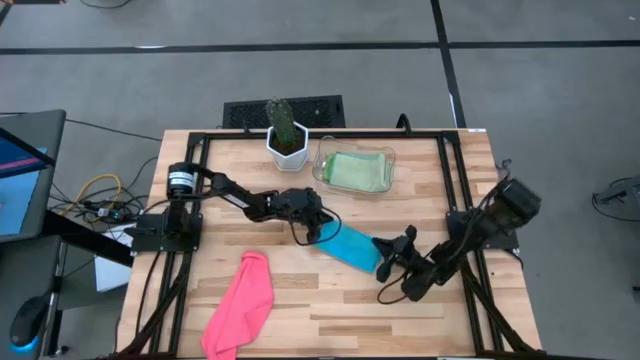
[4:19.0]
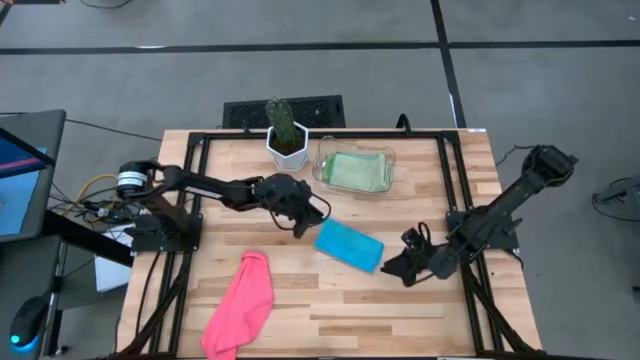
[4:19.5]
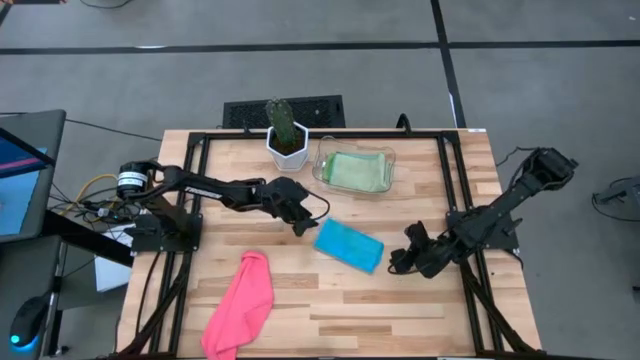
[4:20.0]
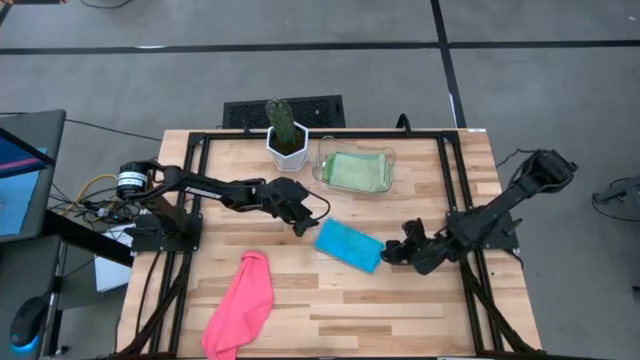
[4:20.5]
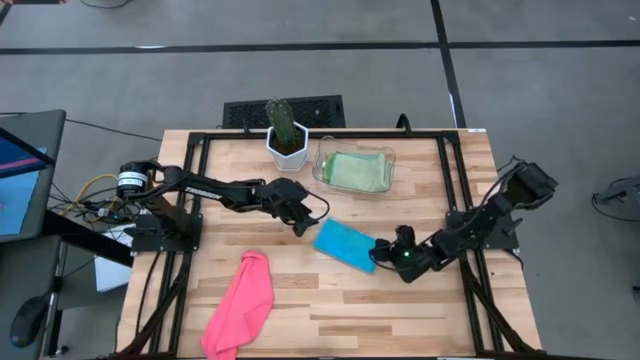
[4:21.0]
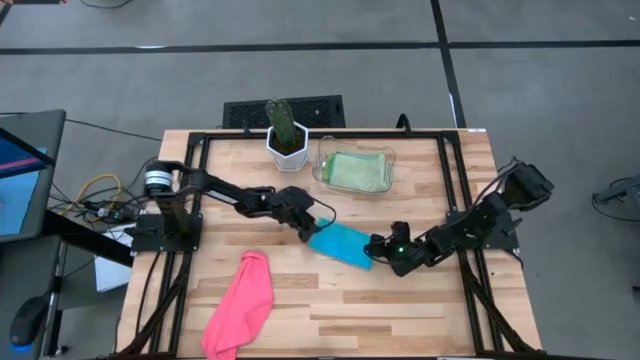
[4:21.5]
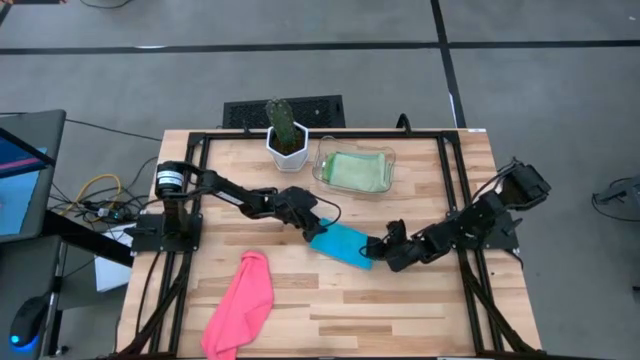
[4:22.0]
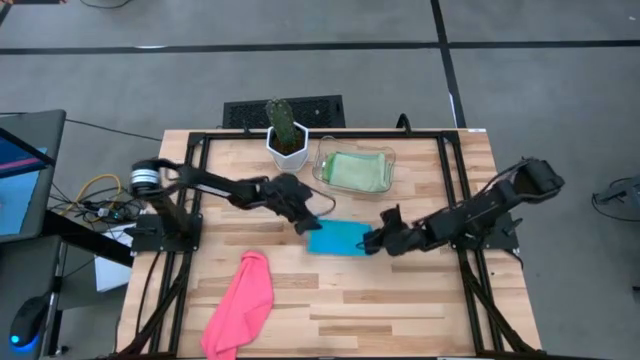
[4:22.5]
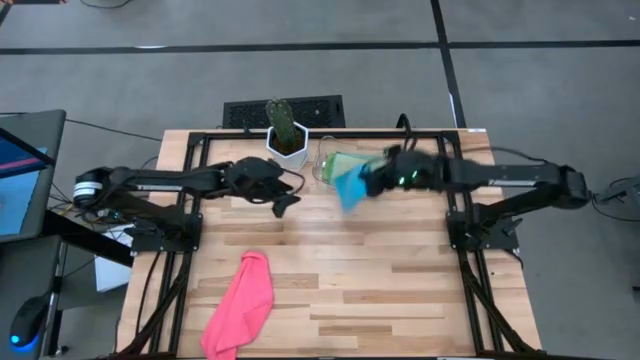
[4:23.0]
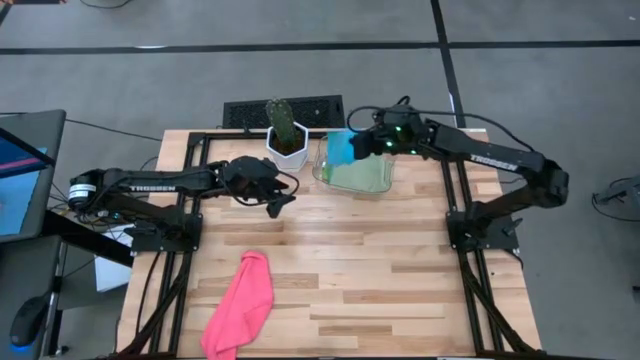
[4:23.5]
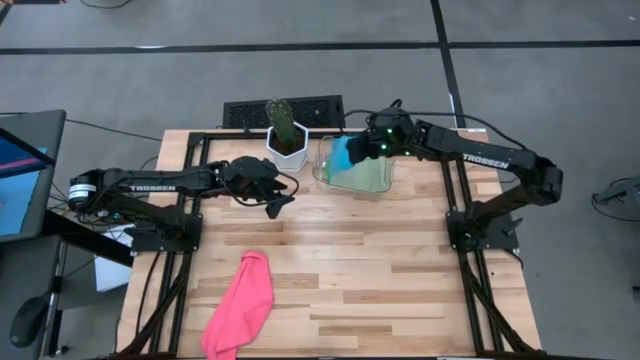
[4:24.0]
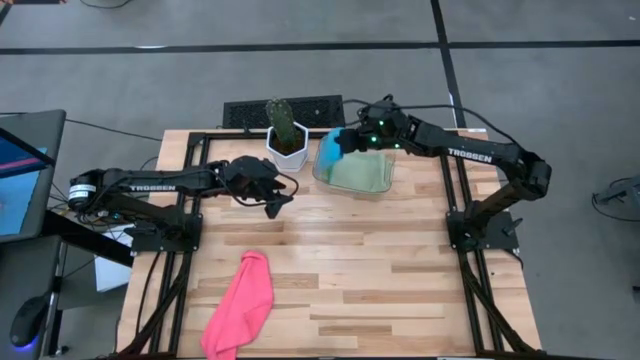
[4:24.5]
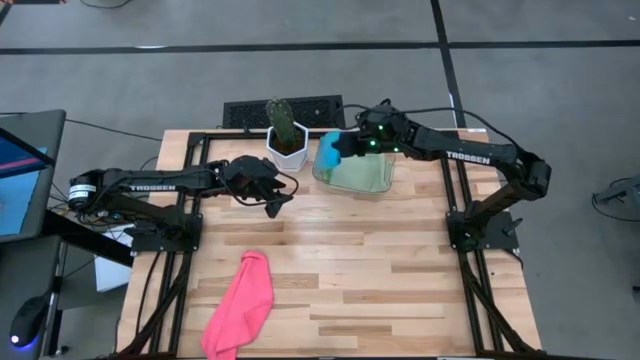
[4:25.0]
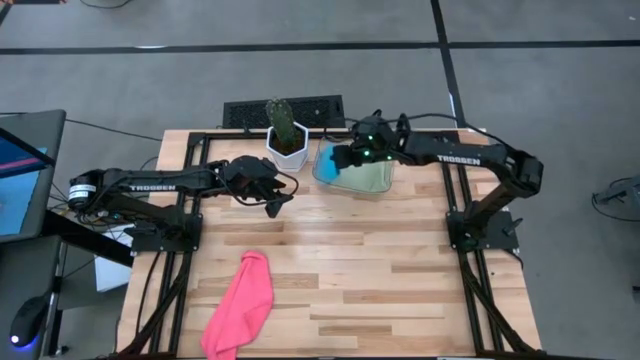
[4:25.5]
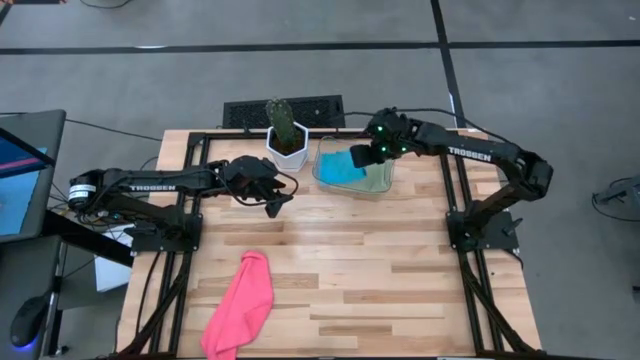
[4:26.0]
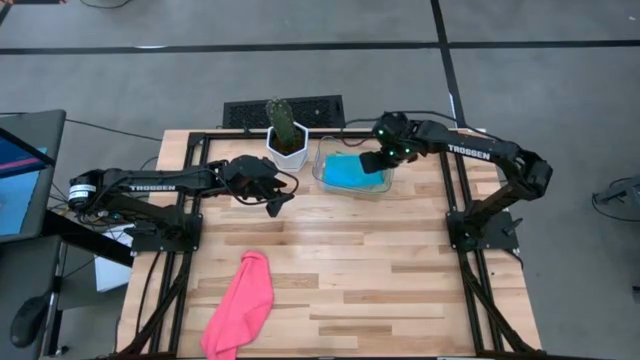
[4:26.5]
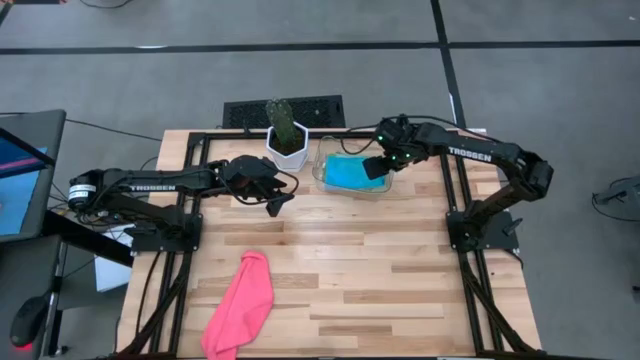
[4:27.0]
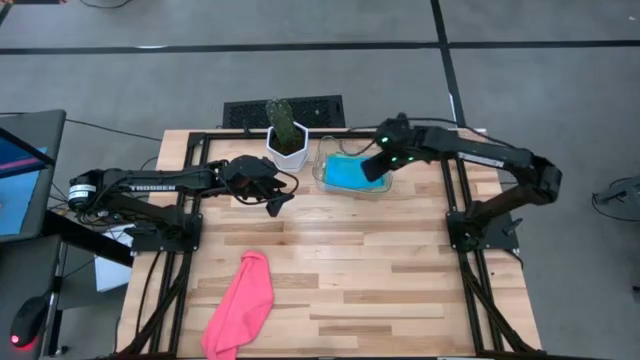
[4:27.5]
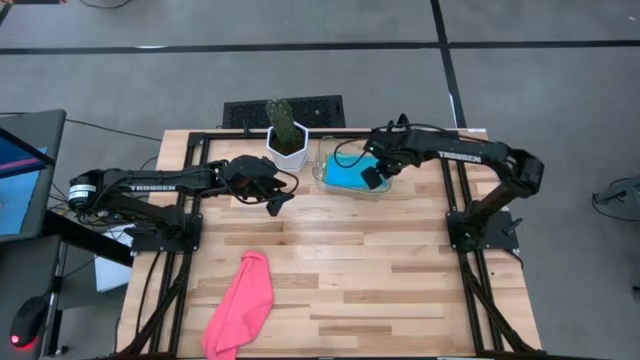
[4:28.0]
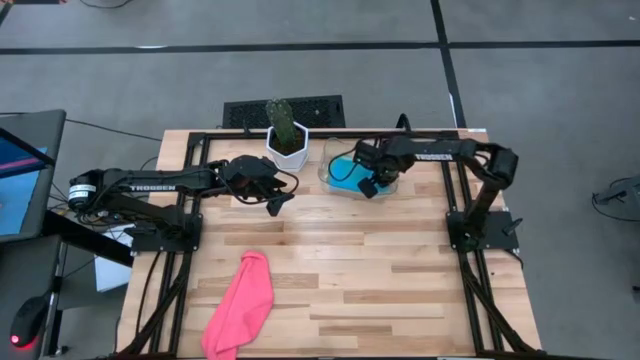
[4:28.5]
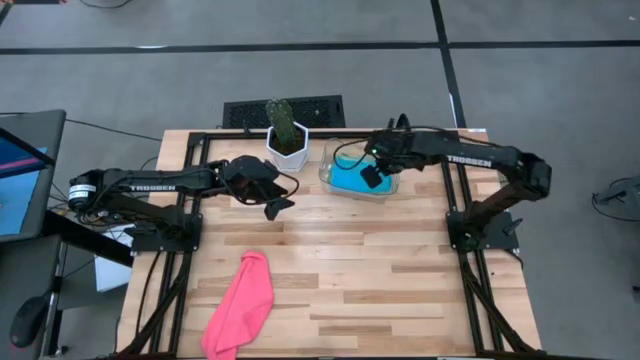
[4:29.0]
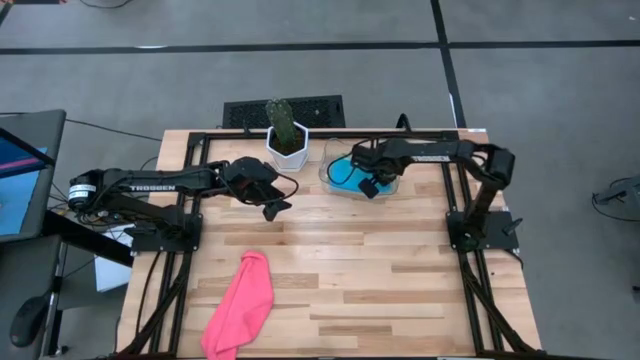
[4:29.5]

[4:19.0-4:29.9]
Task: Fold microfiber towels
Put the folded blue towel into the transparent bin

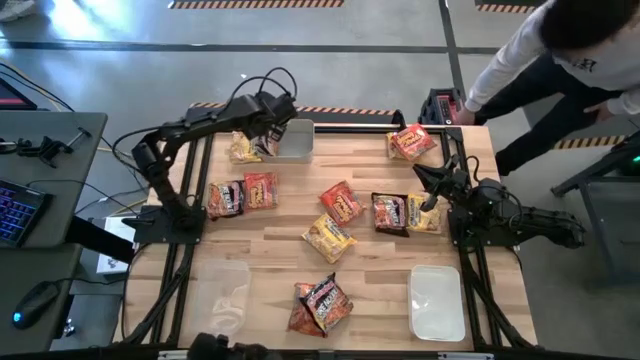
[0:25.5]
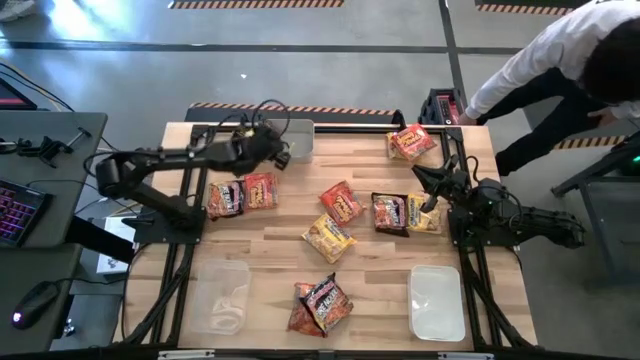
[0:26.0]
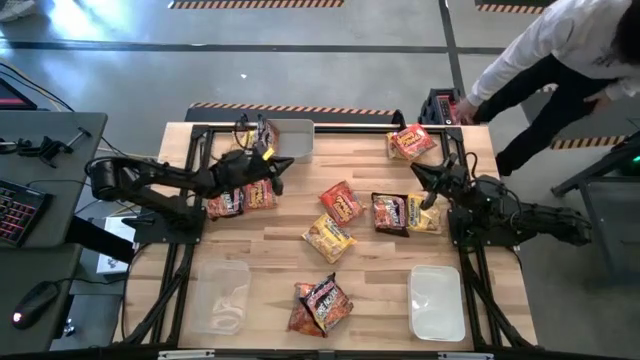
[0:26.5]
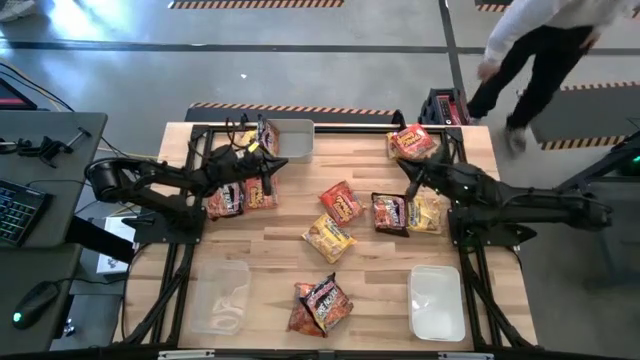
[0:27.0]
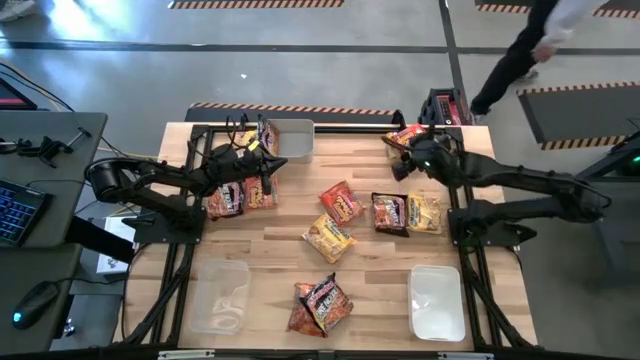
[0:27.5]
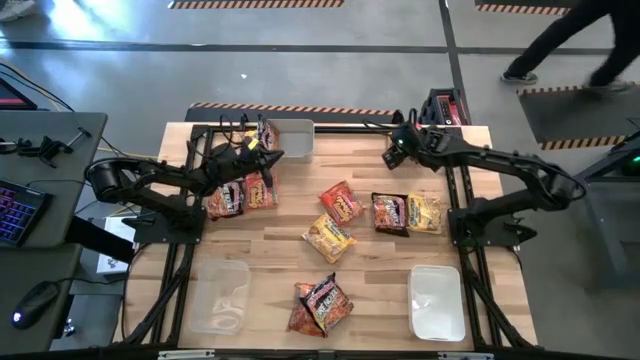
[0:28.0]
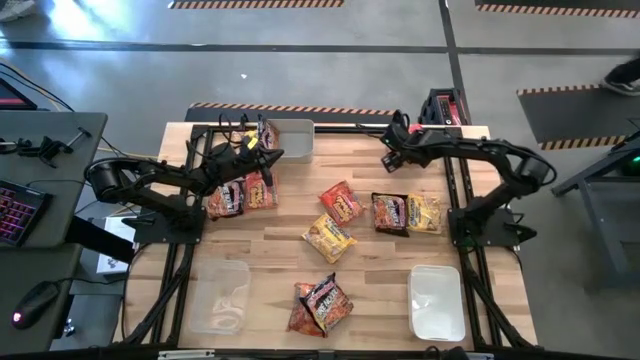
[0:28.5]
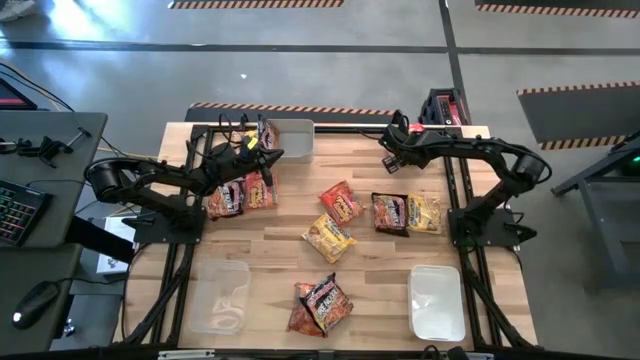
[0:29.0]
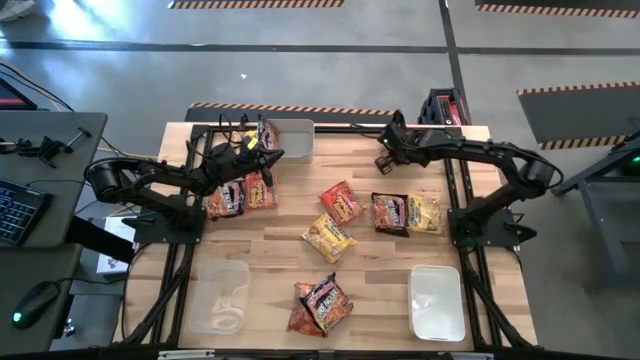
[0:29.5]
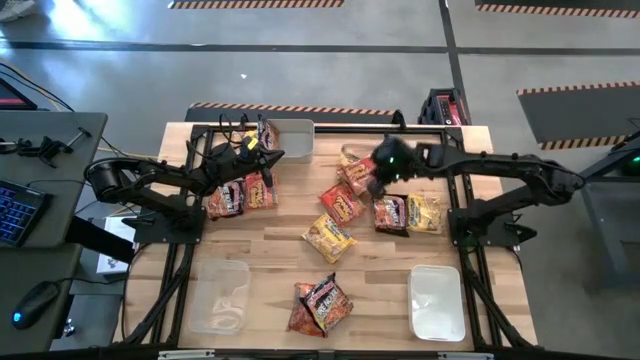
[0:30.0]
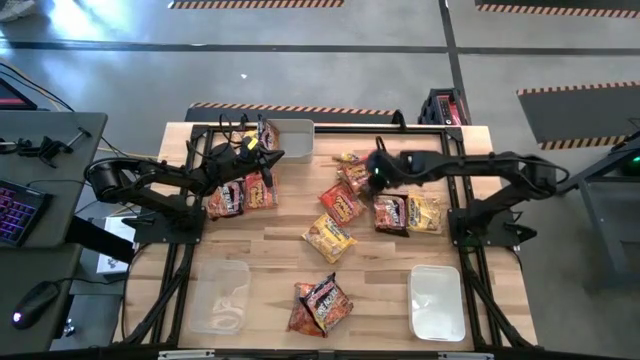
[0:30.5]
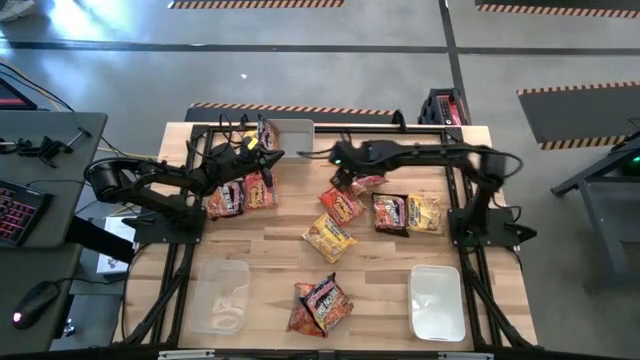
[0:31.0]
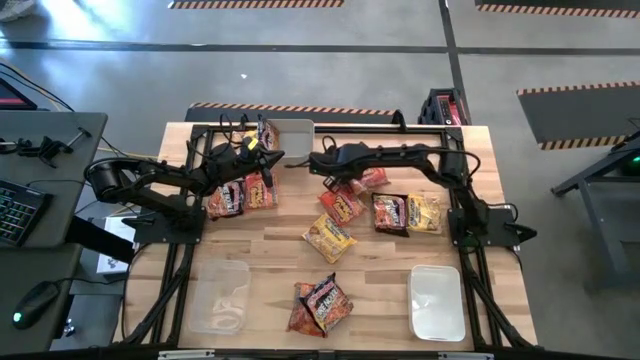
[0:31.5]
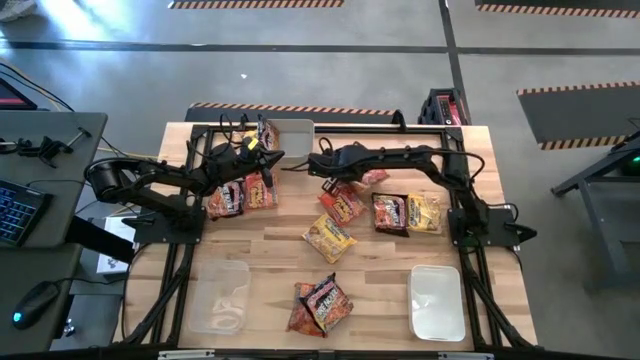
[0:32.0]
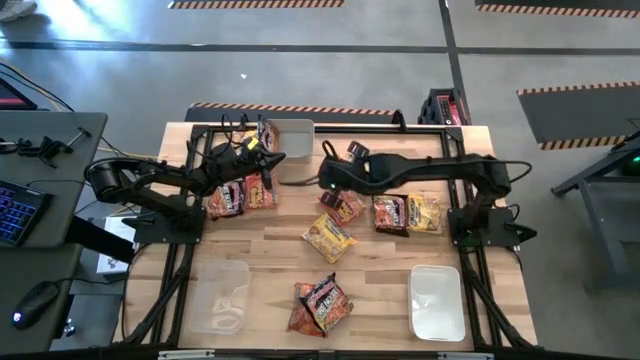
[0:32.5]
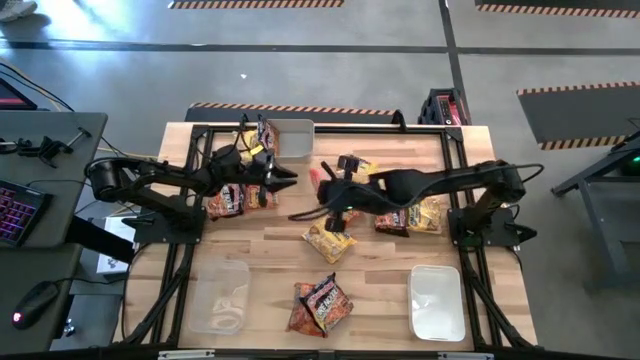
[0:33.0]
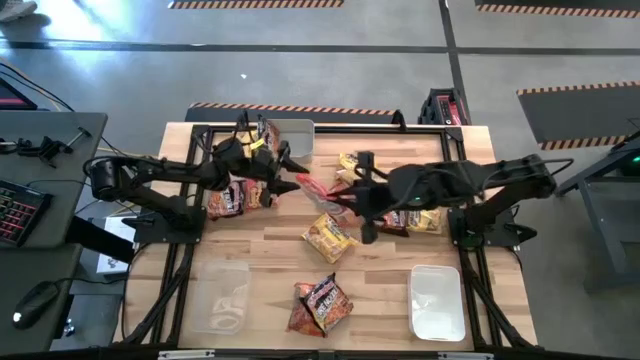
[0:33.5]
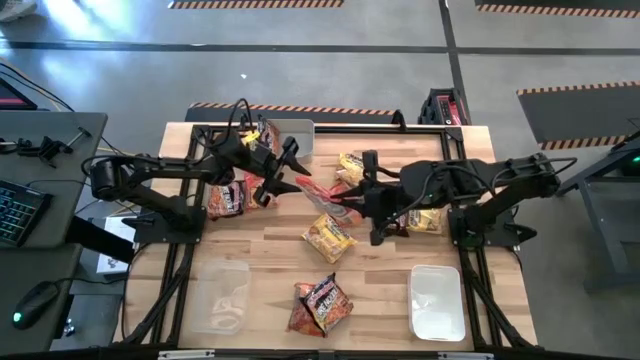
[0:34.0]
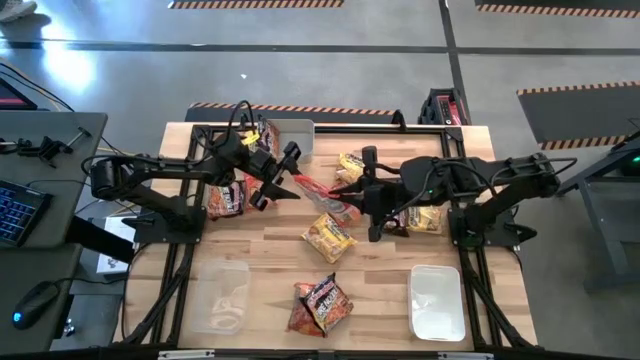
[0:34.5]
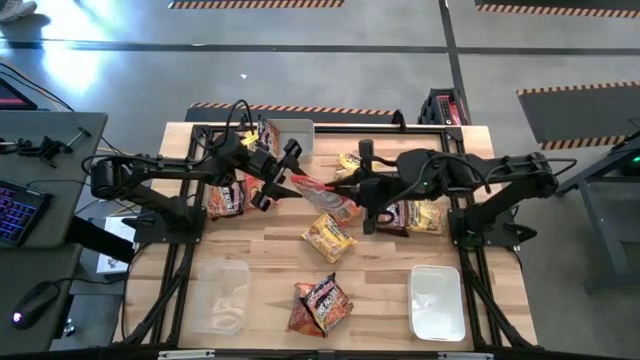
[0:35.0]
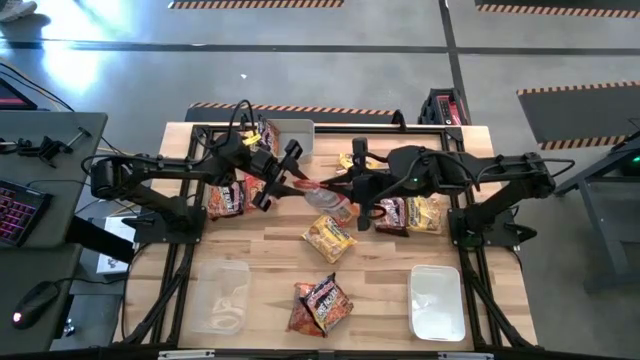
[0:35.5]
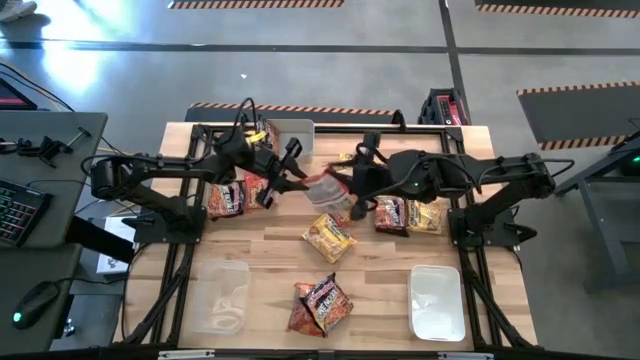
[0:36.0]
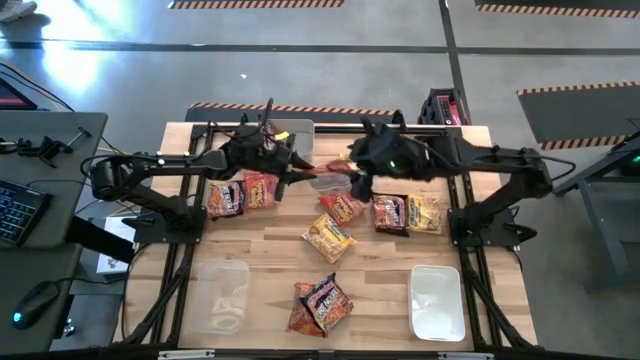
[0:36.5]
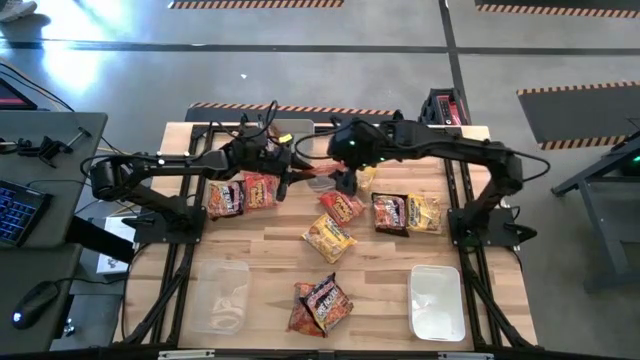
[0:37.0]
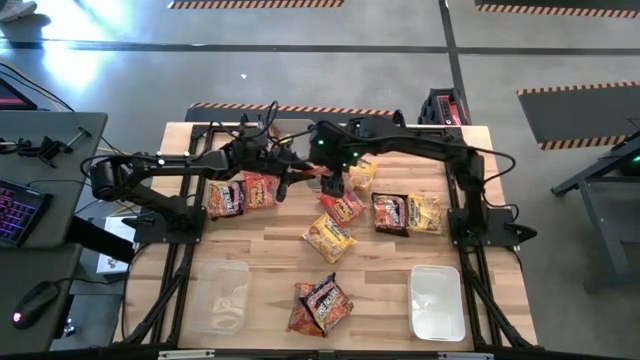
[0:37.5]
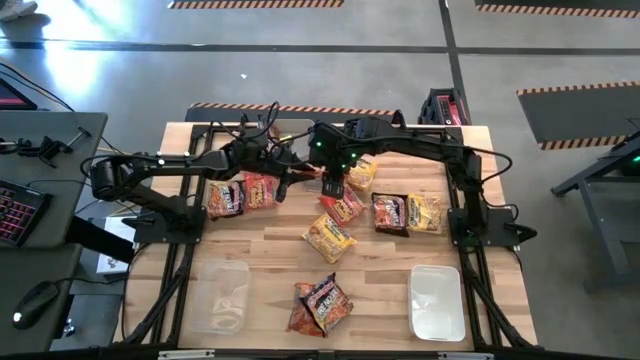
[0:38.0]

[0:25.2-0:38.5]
Task: Sort Maruchan noodles
Put the top right orange noodle pack into the white bin
